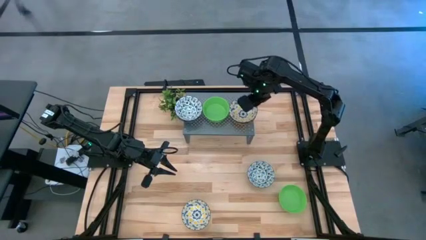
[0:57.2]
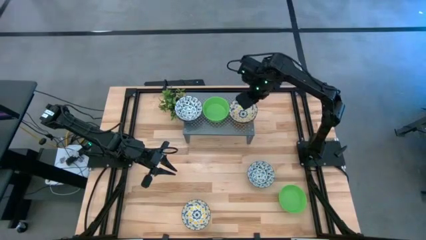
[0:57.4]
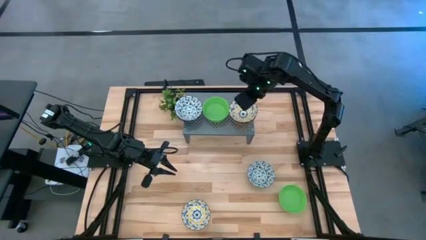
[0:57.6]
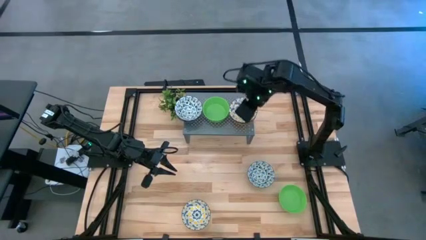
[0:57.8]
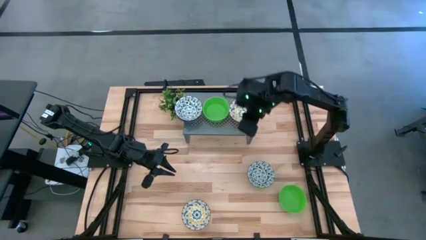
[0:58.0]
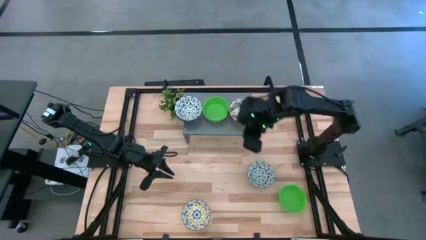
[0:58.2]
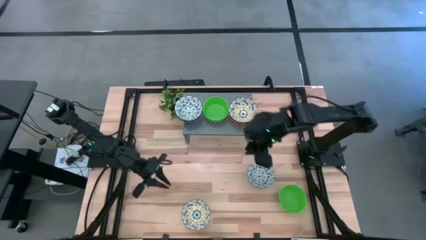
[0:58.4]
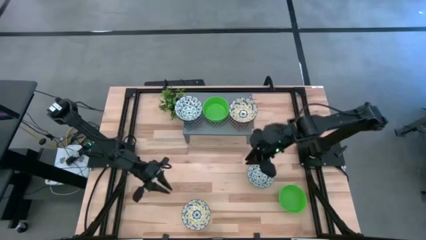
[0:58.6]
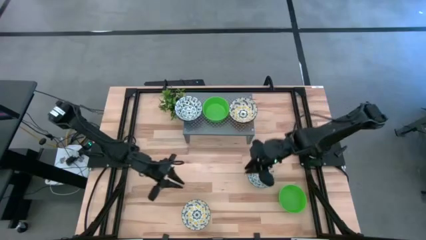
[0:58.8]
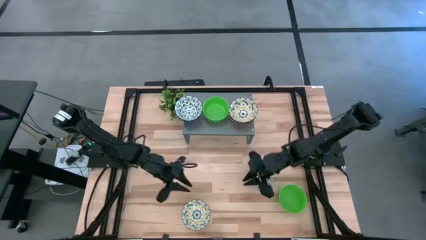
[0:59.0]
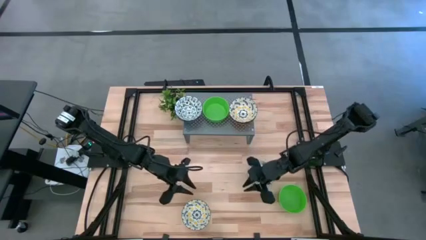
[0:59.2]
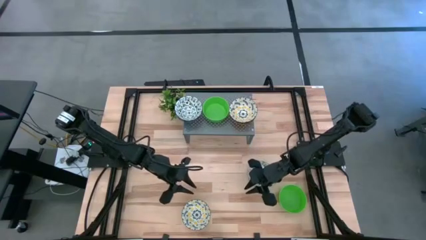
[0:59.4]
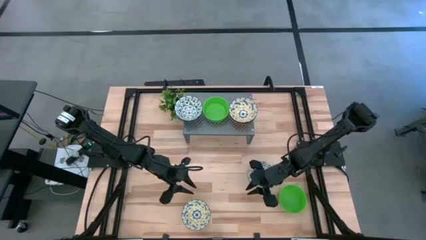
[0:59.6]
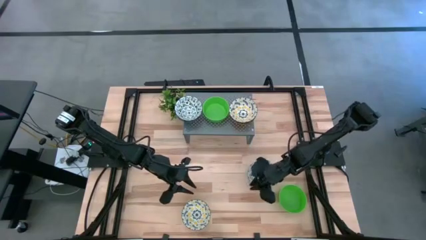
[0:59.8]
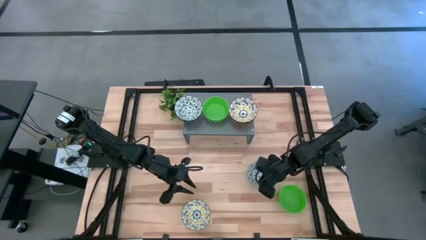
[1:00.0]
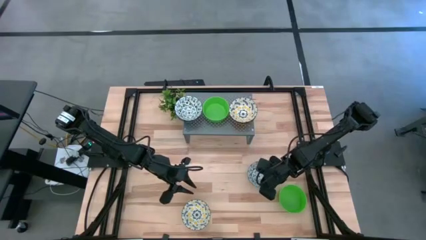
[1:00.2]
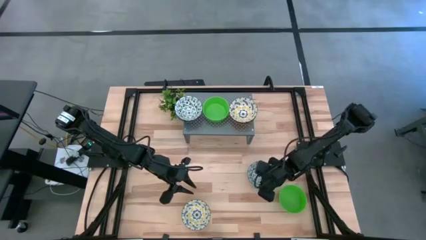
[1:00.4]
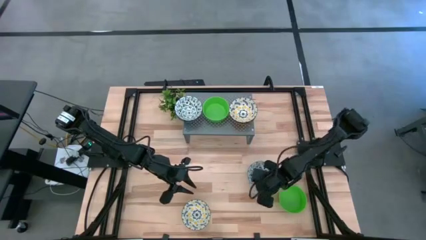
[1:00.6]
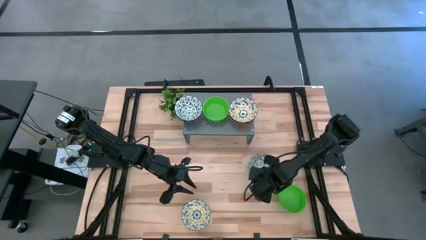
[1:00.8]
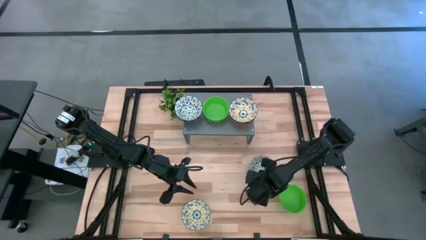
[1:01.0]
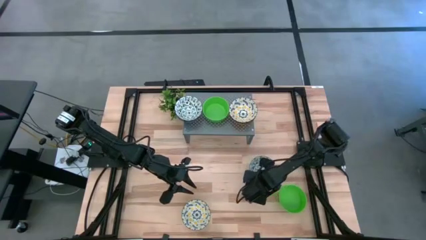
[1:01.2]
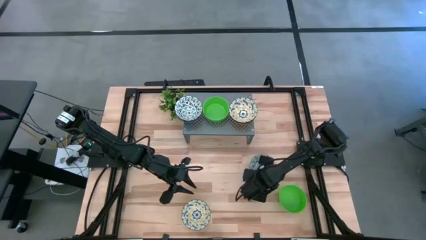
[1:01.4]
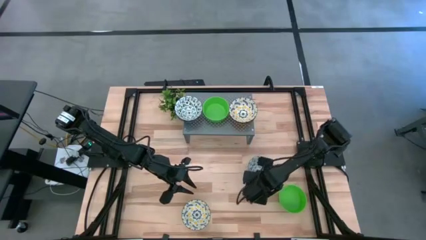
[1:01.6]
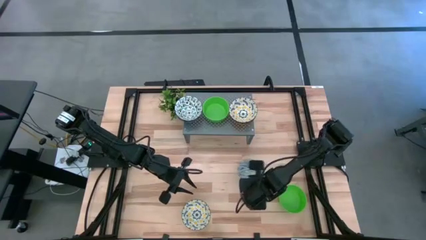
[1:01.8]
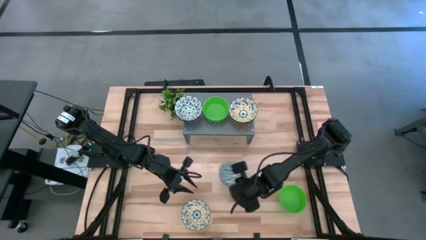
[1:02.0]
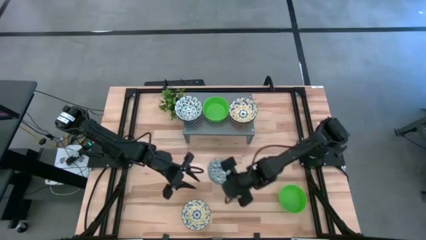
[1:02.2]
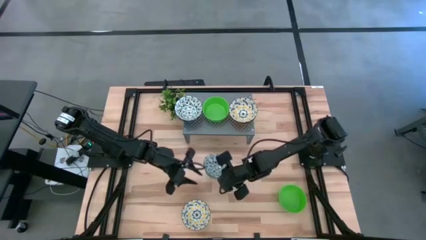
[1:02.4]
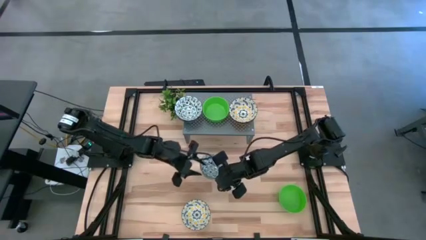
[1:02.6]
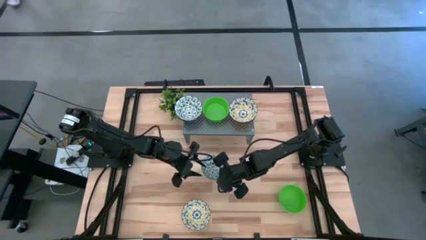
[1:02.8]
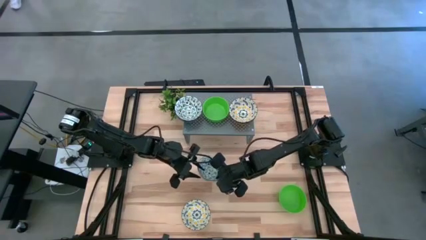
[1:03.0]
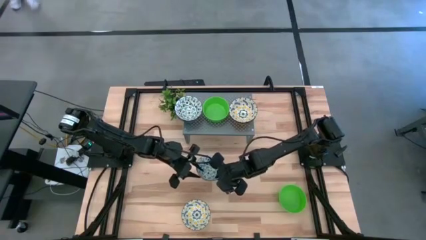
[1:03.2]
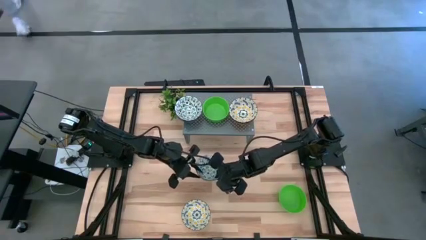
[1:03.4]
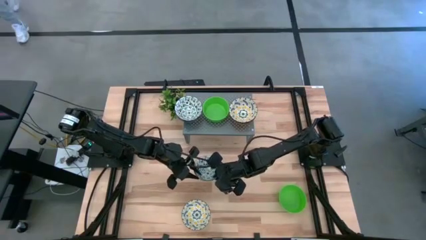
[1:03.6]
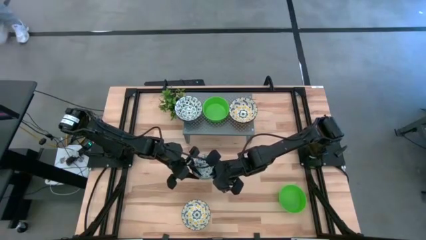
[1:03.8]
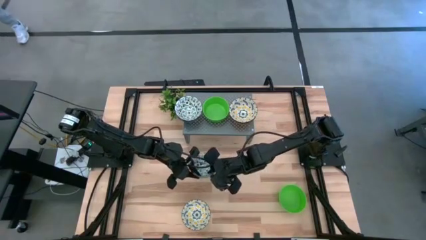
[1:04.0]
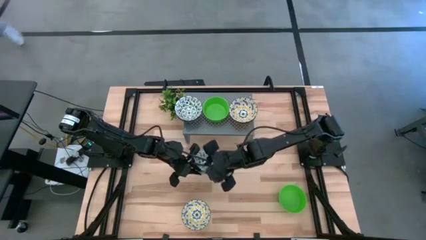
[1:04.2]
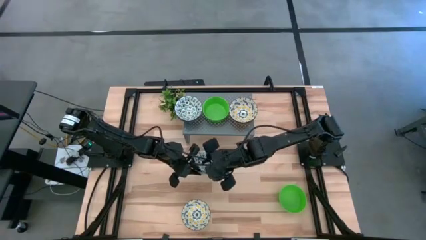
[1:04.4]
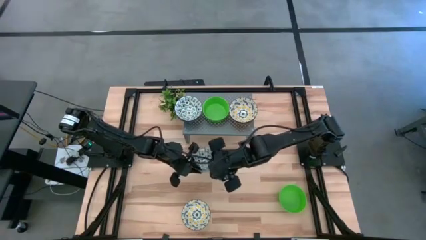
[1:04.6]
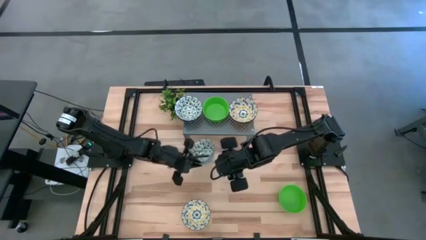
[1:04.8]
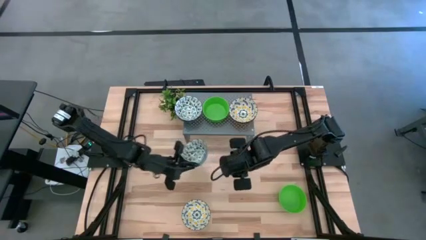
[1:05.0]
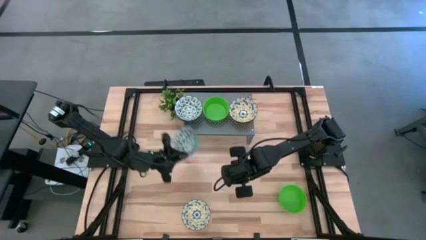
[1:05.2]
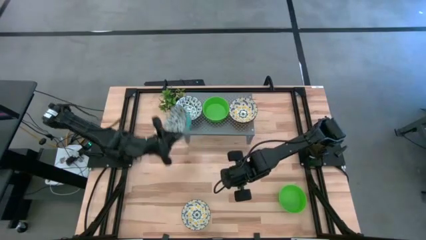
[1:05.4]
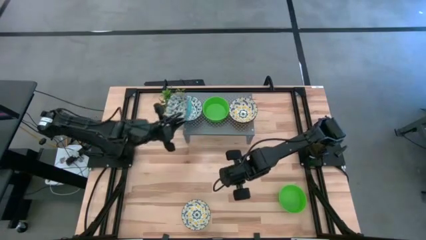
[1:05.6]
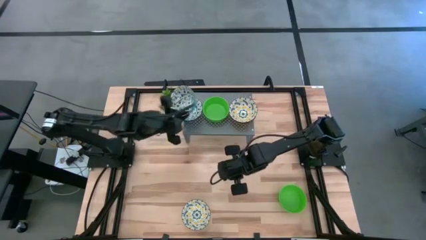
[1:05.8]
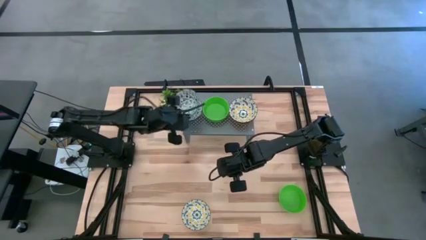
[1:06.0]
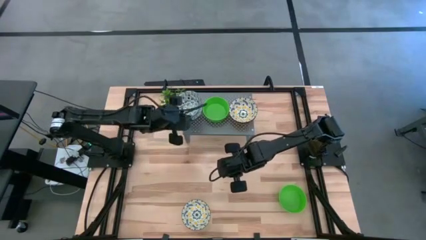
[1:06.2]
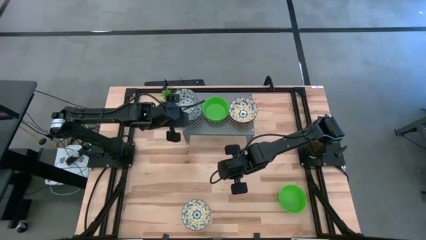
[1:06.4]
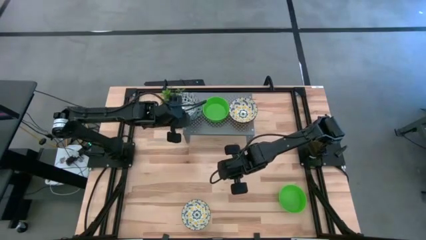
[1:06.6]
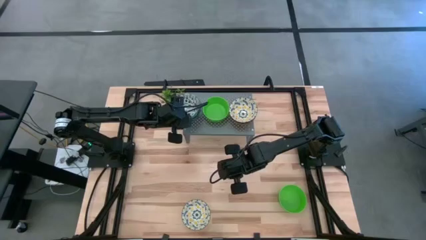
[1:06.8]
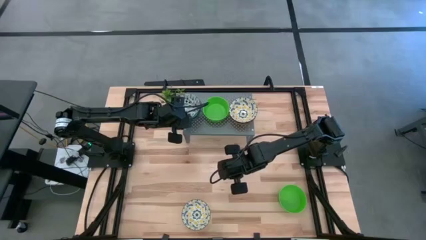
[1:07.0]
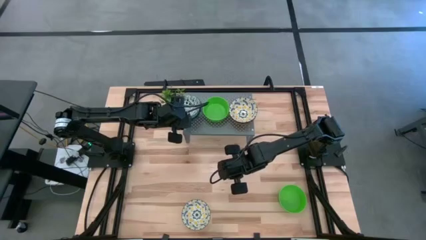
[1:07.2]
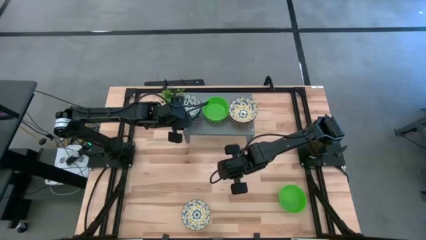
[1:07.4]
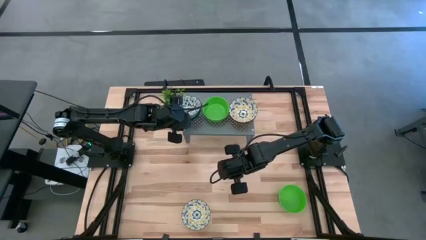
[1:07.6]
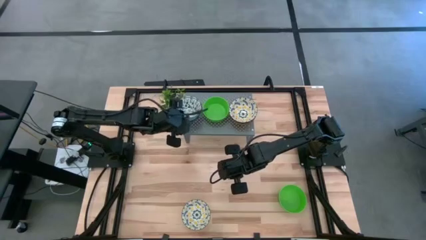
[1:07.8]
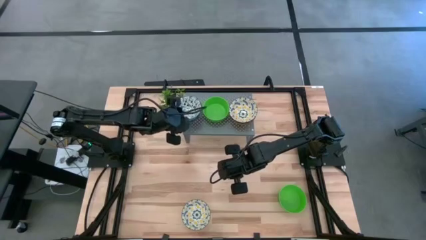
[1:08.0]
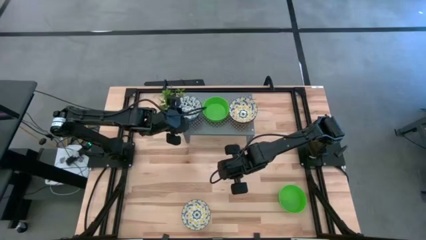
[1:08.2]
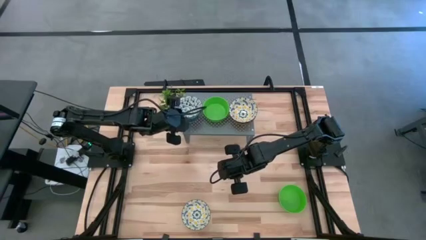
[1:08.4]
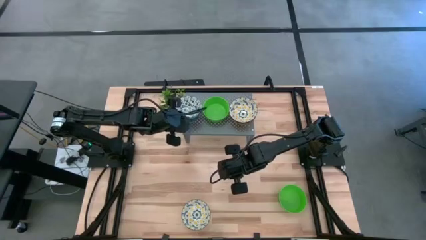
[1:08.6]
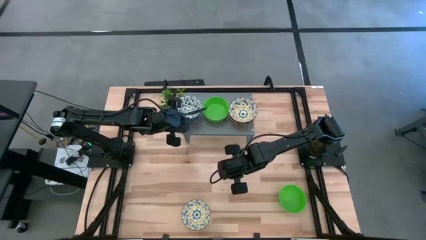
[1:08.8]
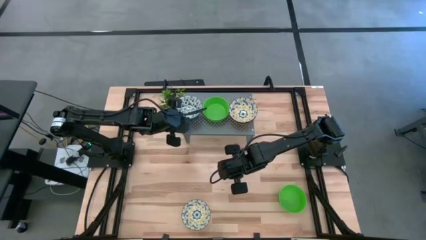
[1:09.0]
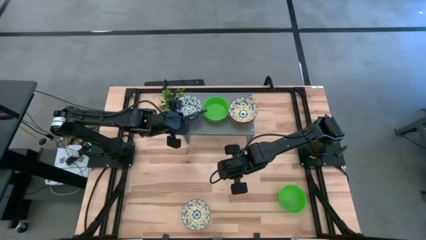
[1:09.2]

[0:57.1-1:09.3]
Task: Pick & Place Mini bowls
Stack the blue and white patterned bowl on the blue and white patterned bowls on the shelf

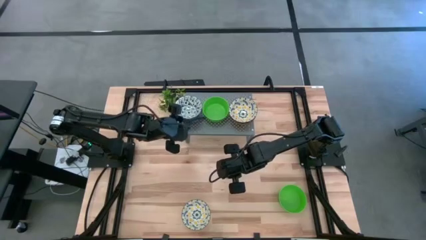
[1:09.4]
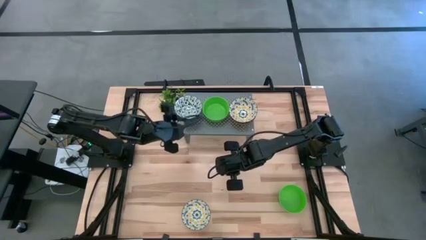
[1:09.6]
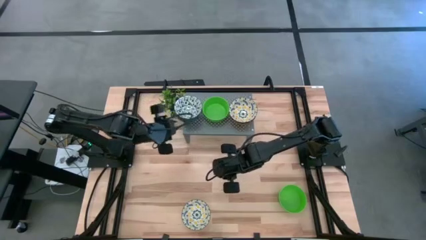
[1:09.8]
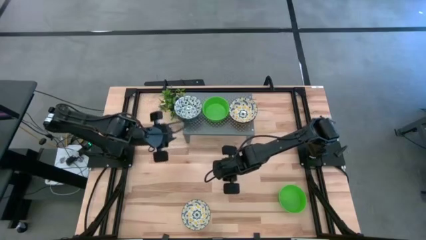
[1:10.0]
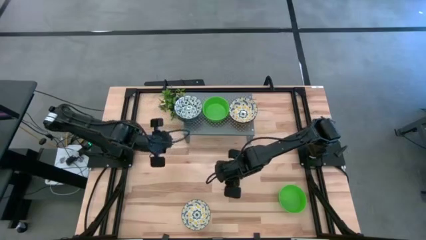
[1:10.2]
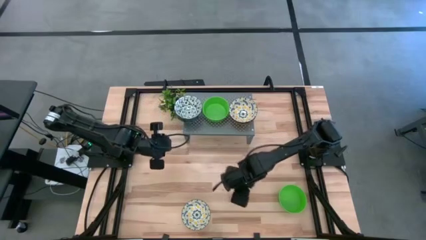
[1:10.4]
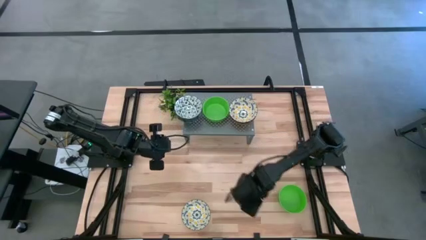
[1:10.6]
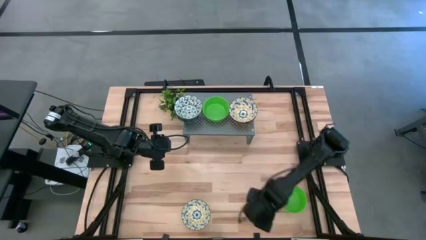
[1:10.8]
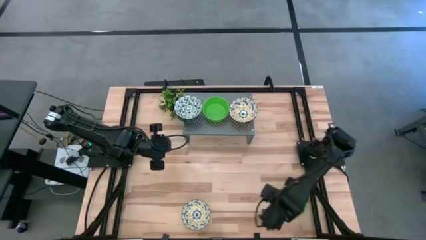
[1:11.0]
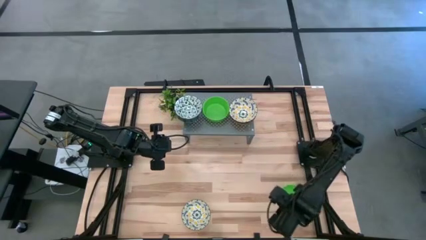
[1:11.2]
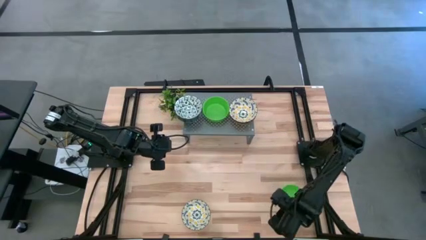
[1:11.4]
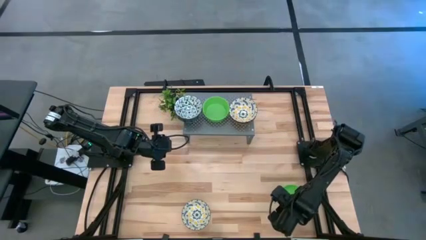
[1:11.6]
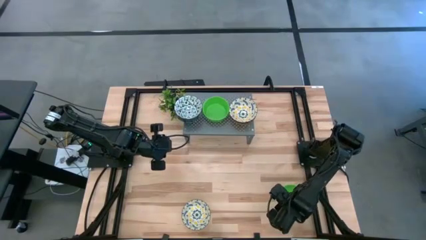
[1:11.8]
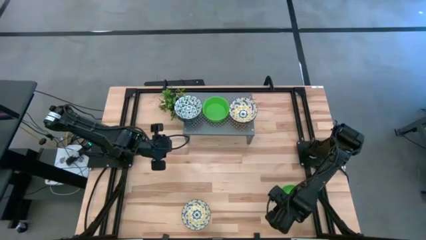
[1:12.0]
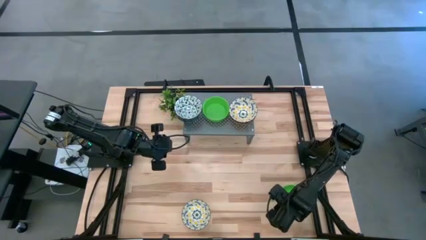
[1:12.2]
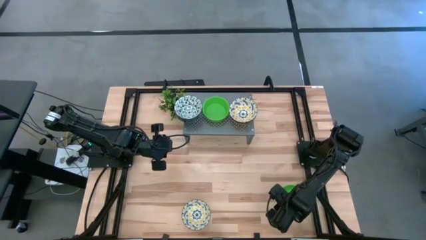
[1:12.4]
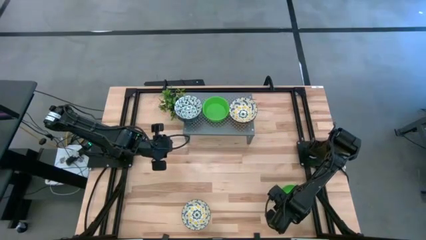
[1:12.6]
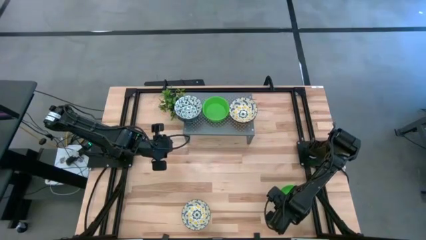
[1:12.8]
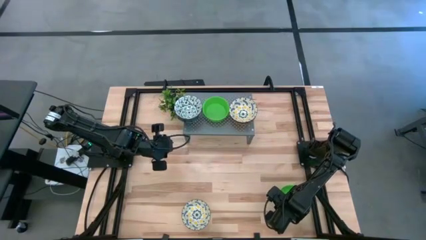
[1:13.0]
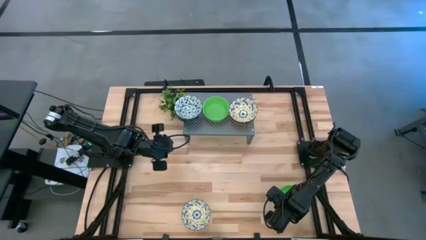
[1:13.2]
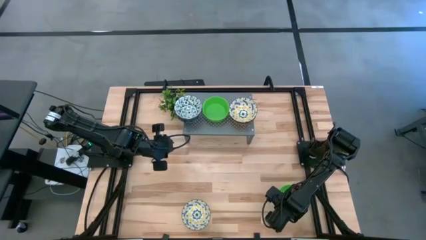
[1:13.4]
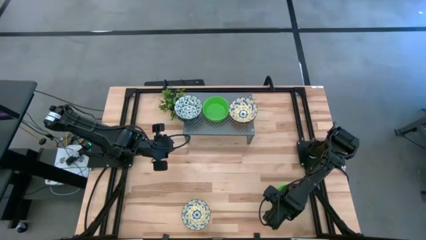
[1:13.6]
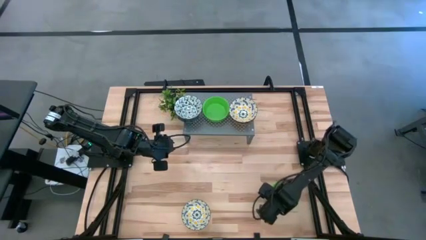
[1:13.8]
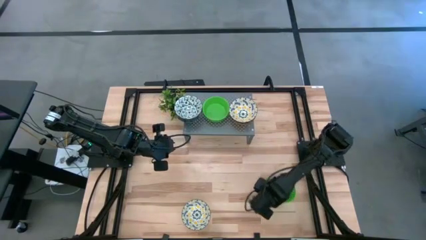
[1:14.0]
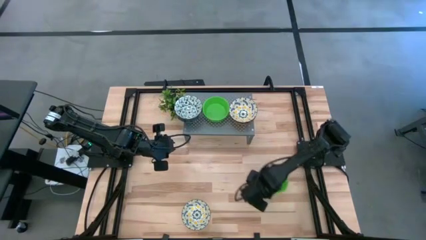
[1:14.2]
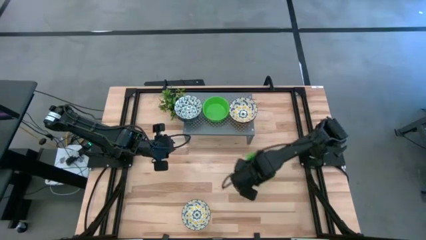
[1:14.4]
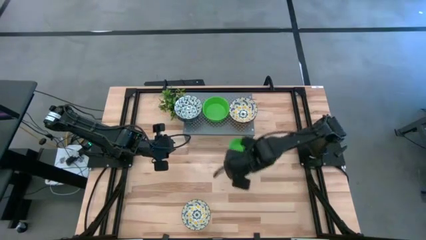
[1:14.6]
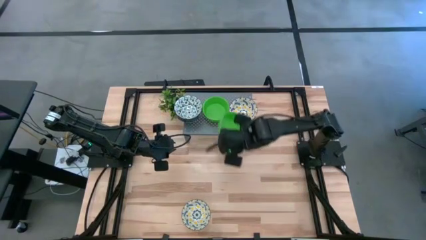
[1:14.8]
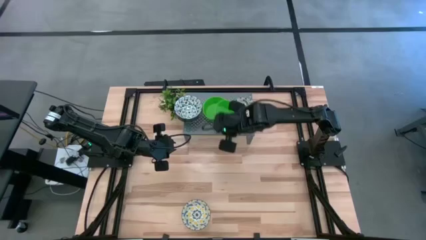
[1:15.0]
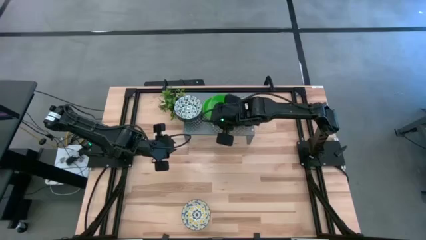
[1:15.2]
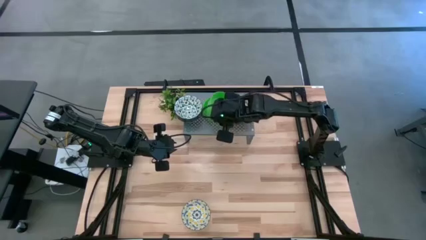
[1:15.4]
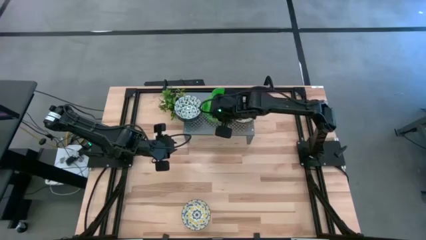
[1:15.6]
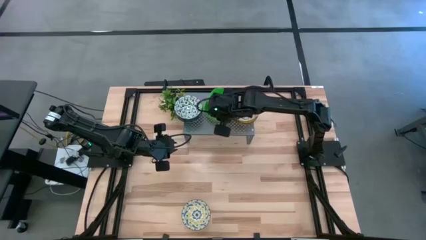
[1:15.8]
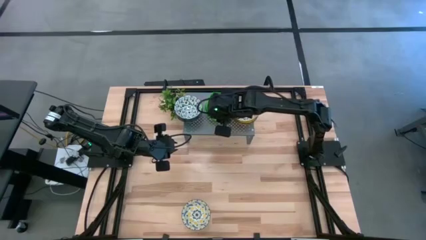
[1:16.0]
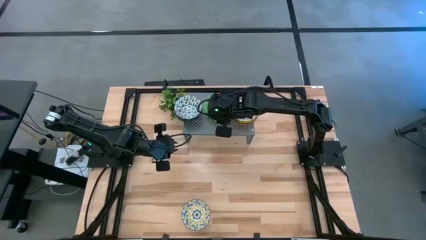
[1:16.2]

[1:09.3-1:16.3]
Stack the green bowl on the other green bowls on the shelf
